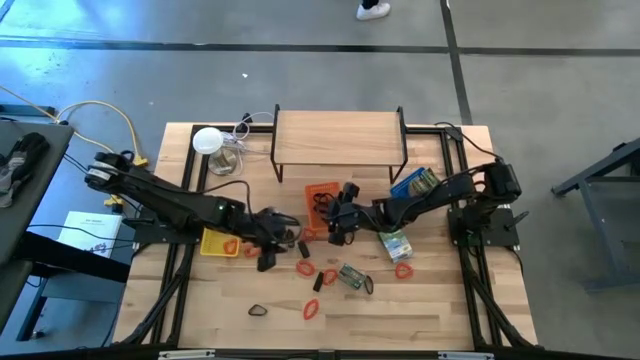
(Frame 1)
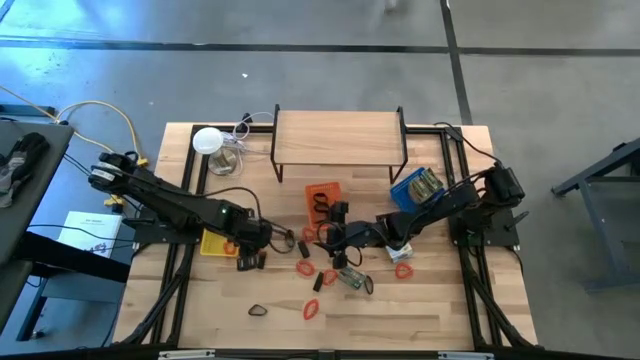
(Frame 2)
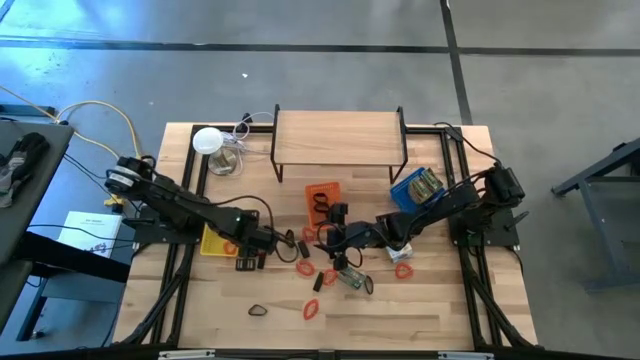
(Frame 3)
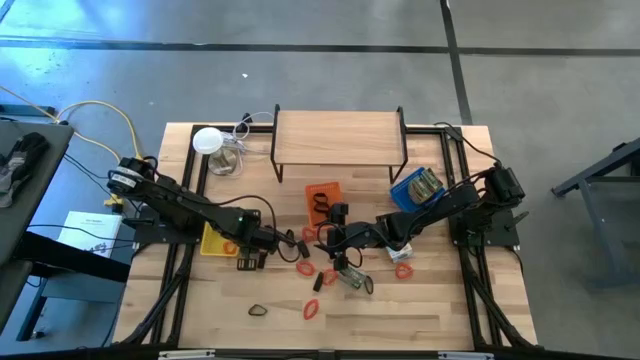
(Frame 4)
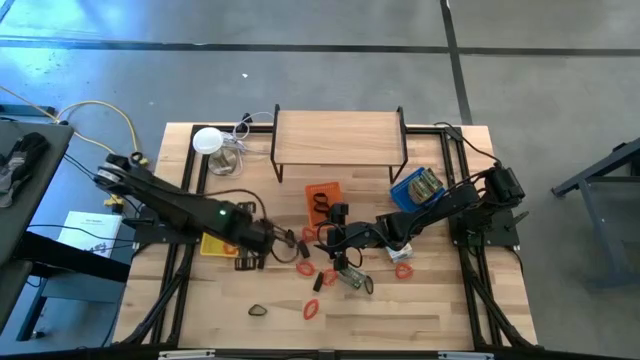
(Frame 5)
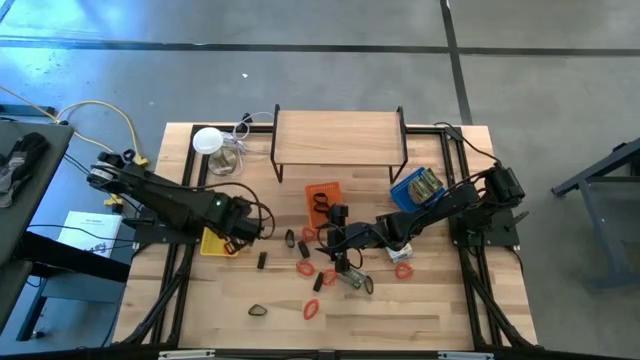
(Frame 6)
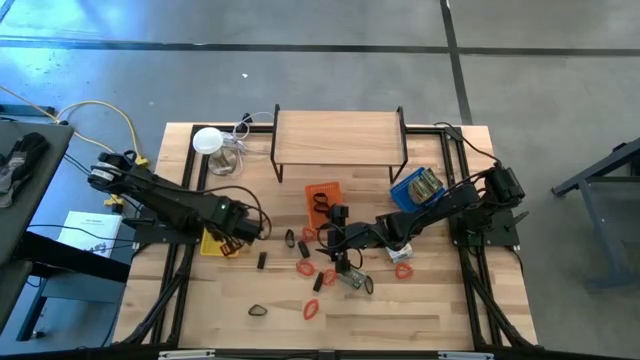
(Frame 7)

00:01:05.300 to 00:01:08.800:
Task: Pick & Place Office Desk Supplies
Put the orange spring key chain into the yellow bin

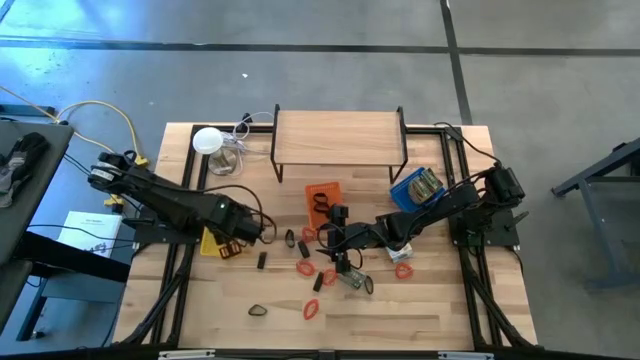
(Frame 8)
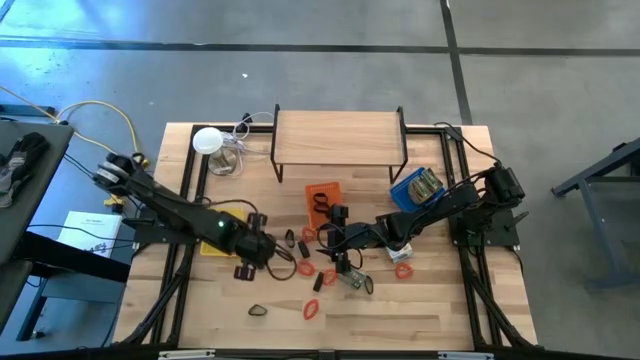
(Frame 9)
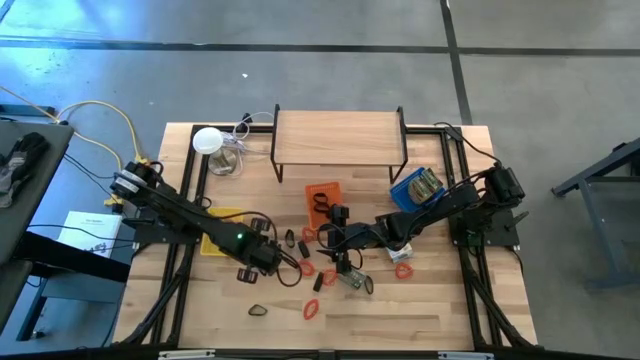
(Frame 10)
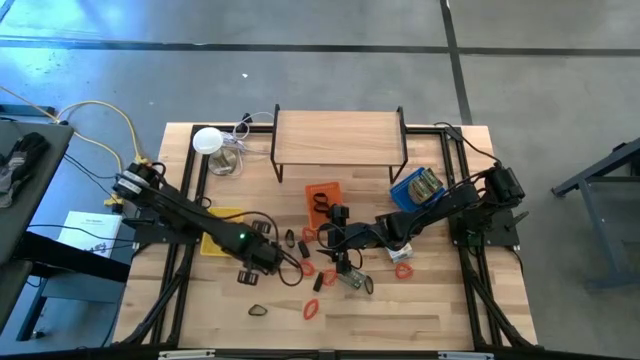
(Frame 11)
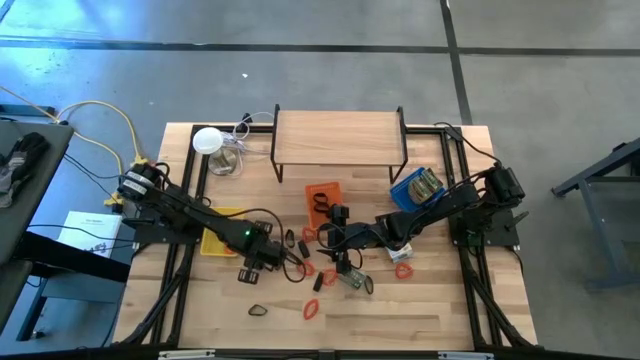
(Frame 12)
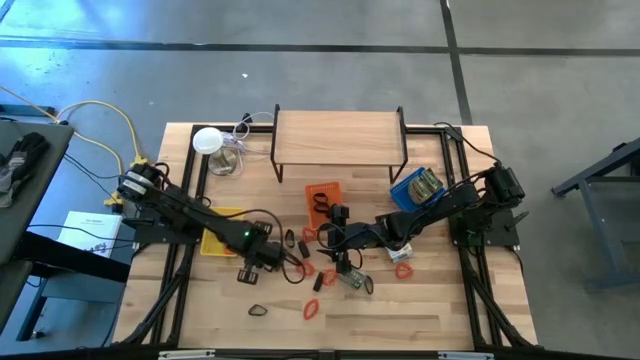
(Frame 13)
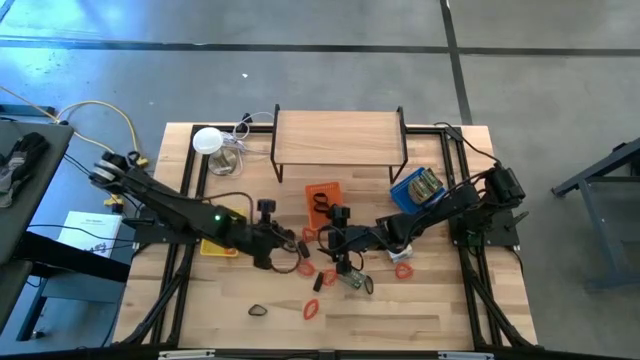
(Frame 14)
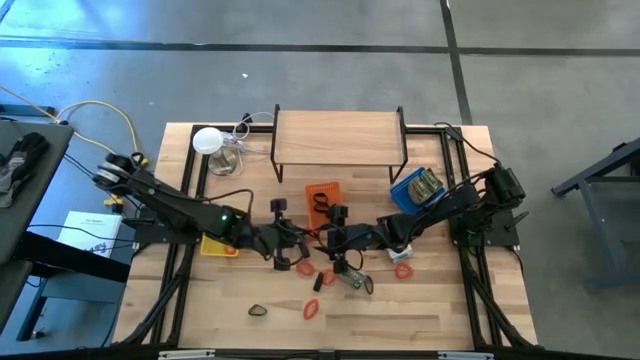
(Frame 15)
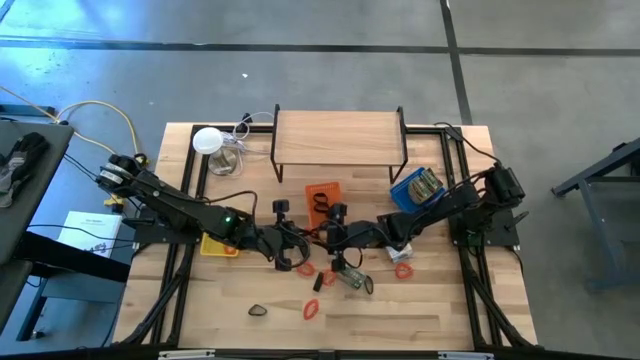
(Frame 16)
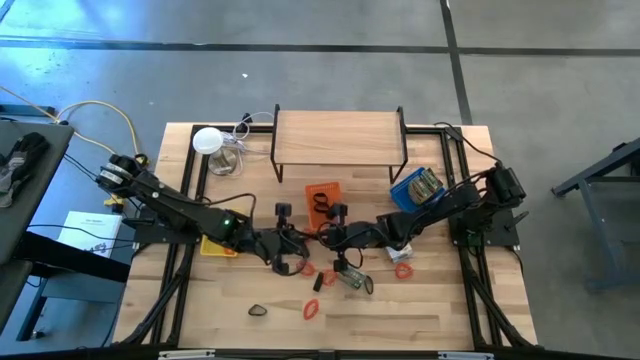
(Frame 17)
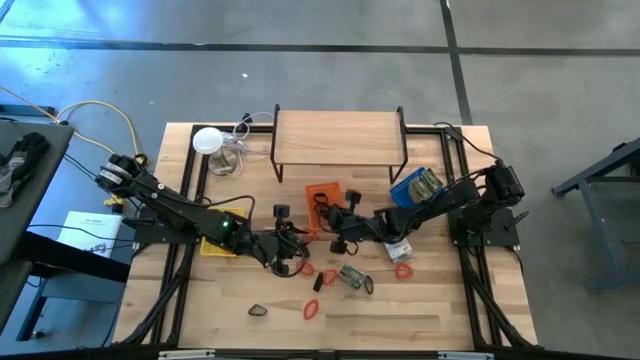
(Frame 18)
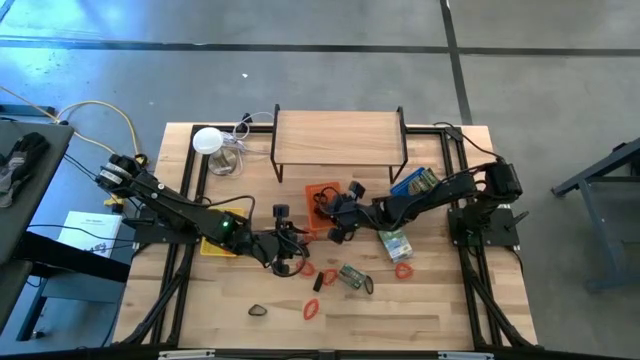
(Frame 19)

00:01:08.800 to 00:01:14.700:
Put the black rubber band into the orange bin

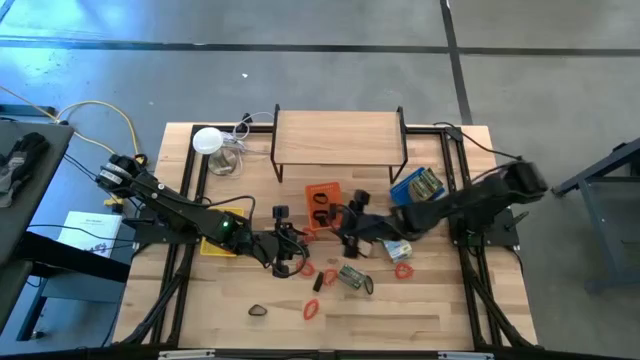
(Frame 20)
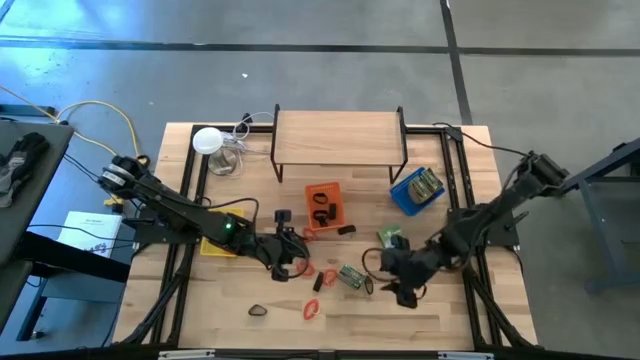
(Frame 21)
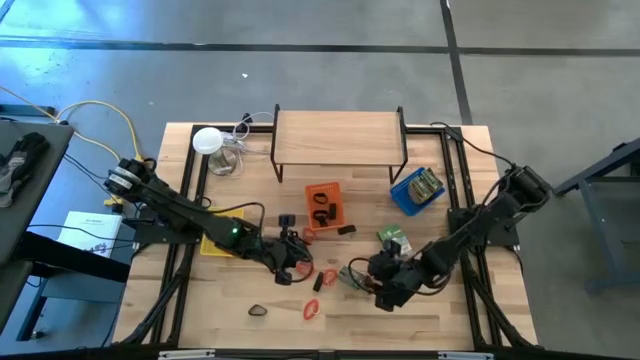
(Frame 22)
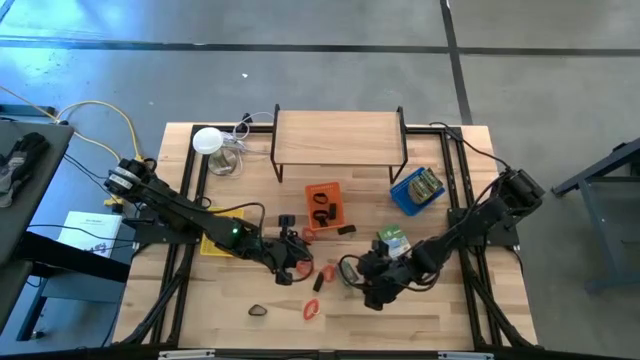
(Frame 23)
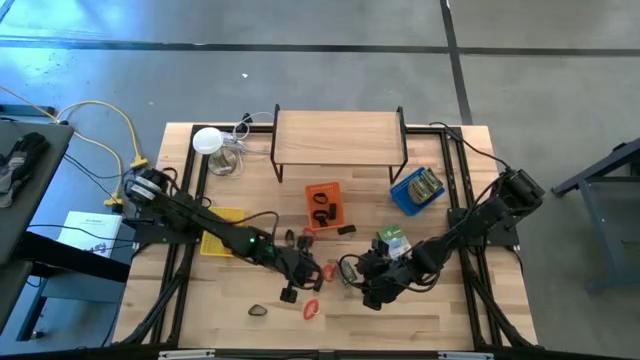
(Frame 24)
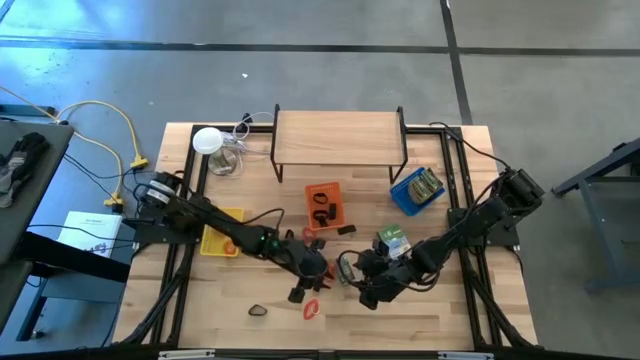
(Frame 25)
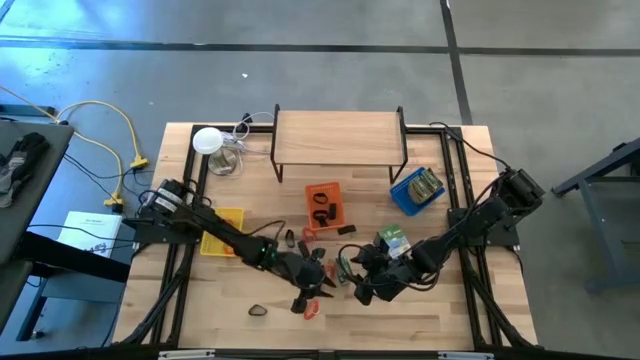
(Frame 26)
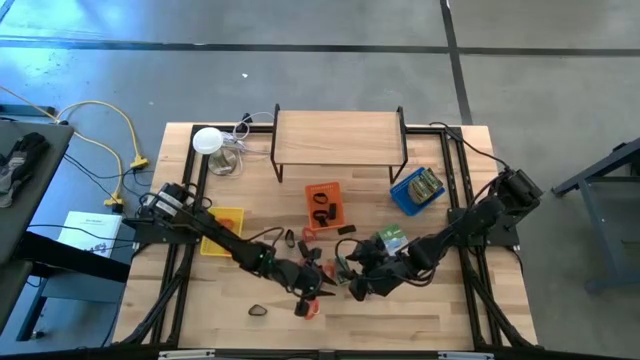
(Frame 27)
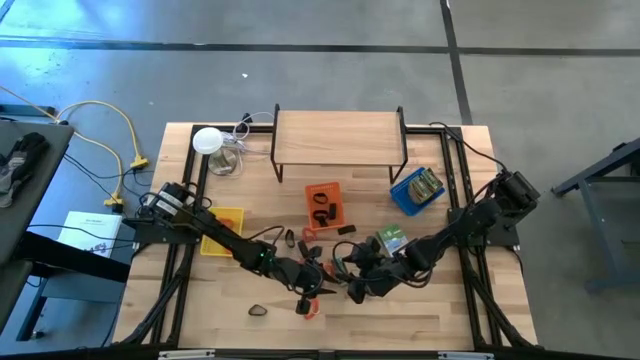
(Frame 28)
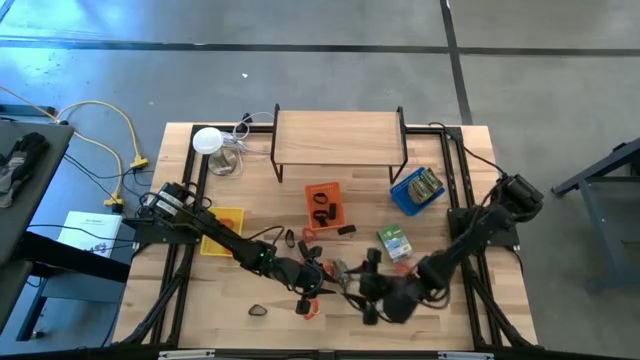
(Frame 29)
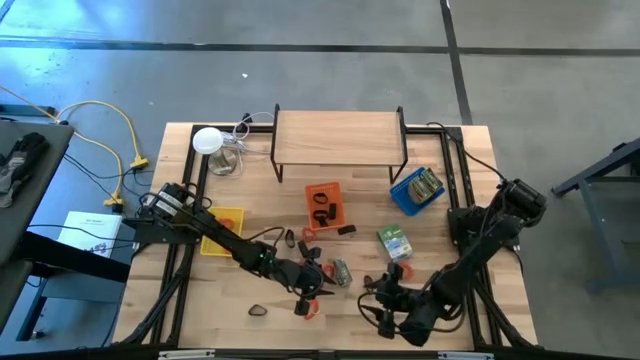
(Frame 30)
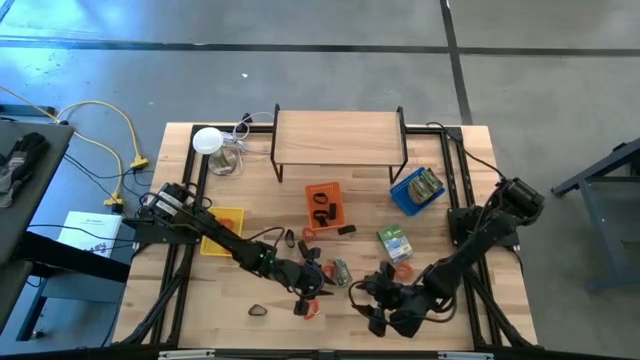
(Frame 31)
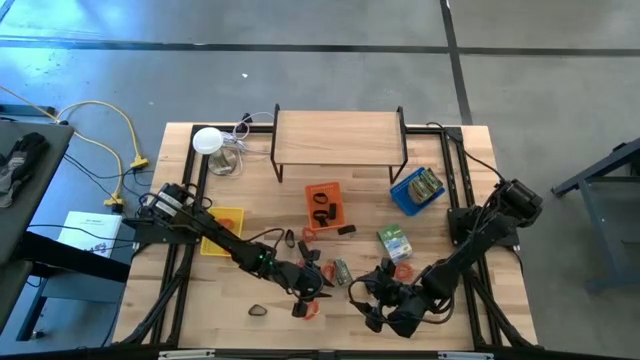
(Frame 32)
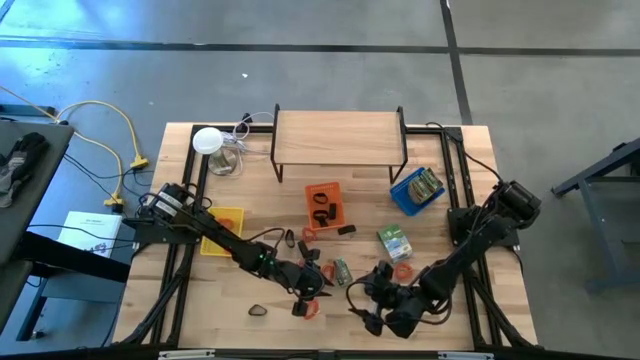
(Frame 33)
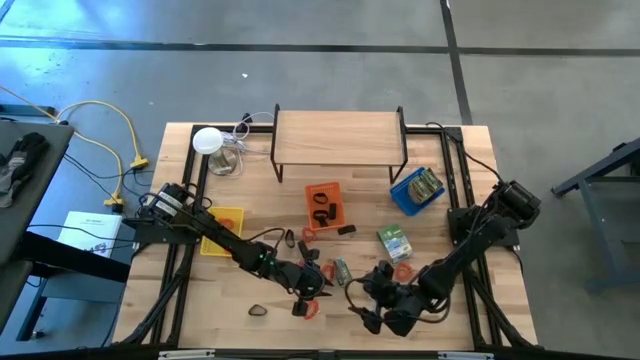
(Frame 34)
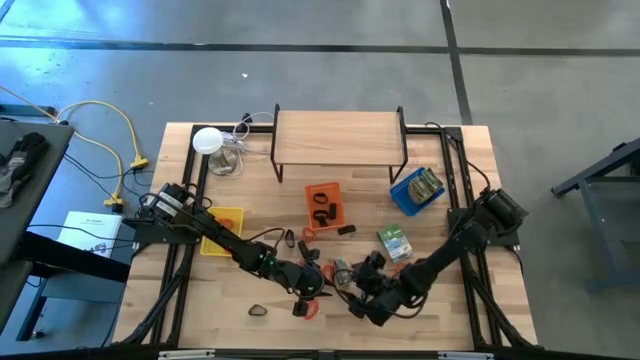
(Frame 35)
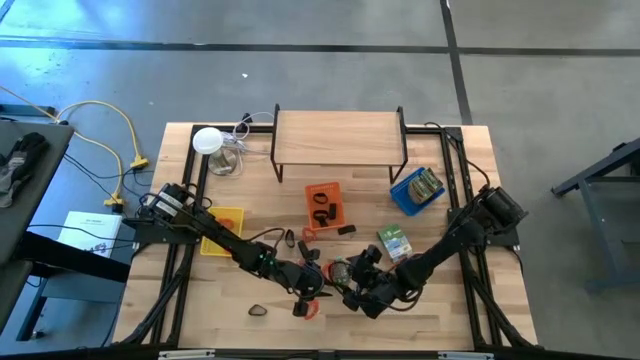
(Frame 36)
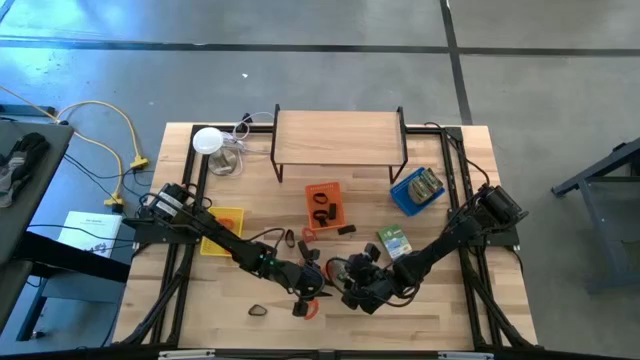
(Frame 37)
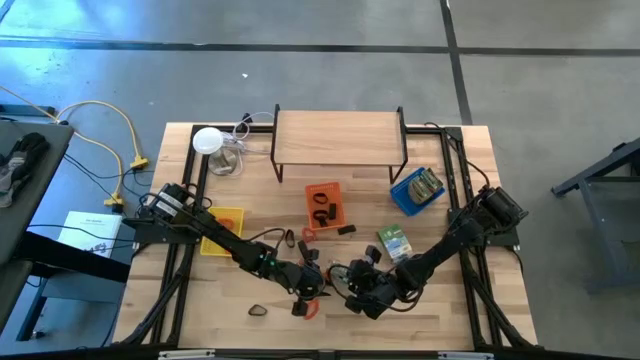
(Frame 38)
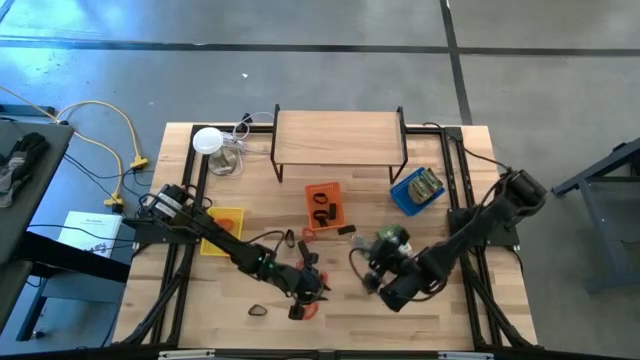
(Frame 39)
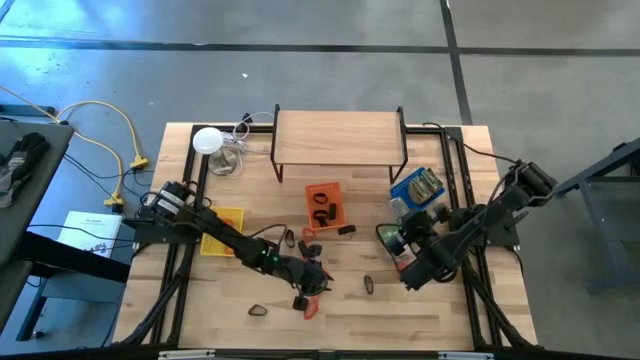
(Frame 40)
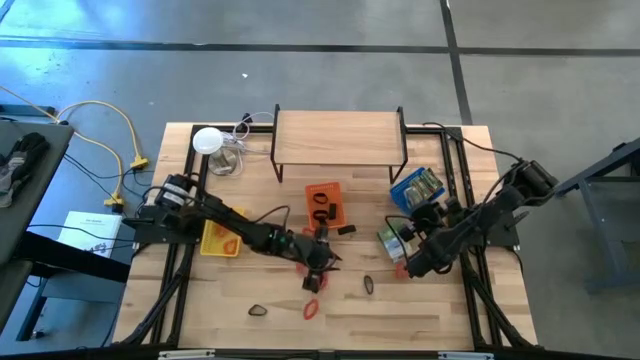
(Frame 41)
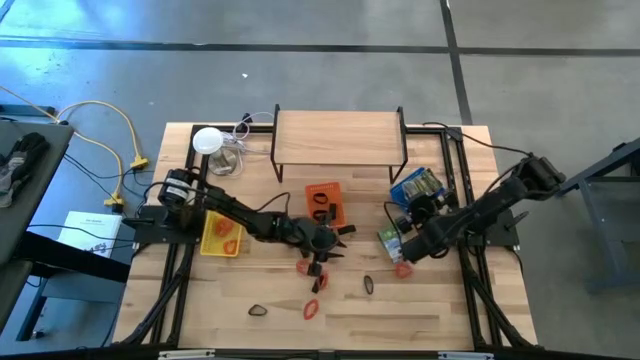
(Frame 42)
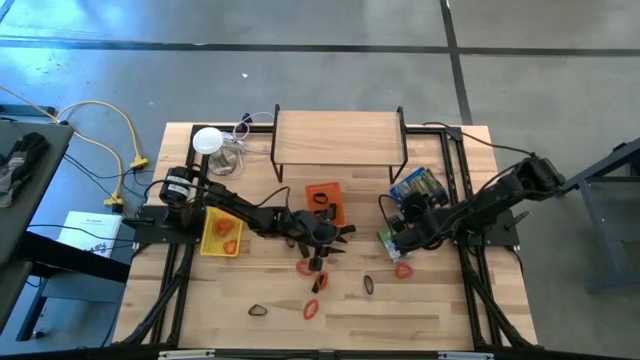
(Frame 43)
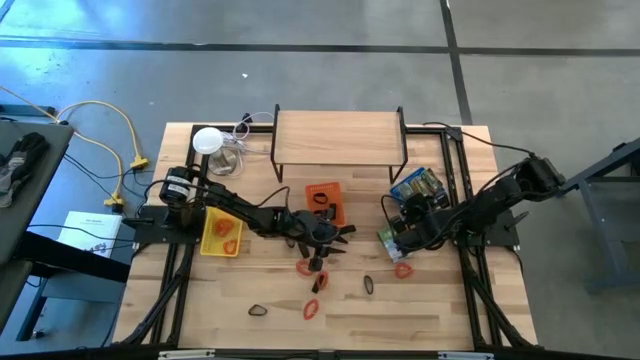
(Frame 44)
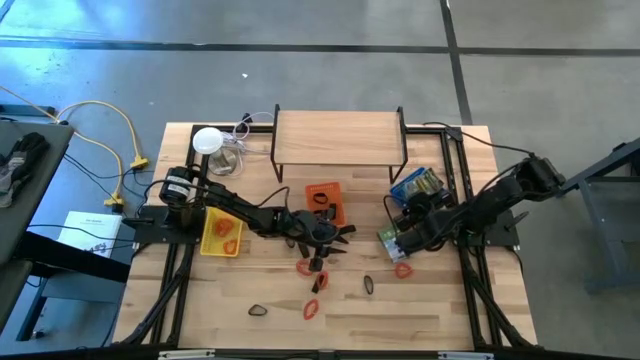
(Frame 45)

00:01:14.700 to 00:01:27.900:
Put the yellow crayon box into the blue bin
